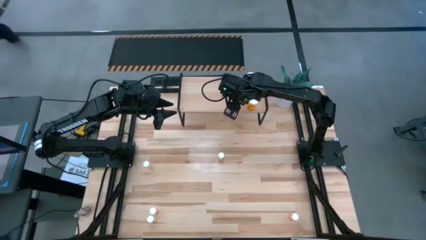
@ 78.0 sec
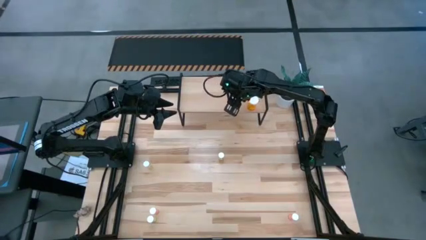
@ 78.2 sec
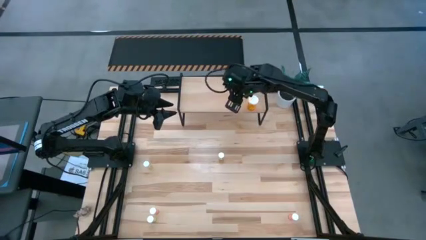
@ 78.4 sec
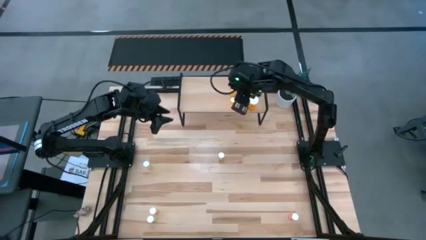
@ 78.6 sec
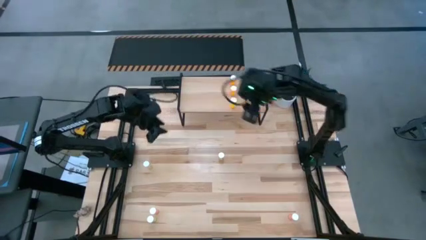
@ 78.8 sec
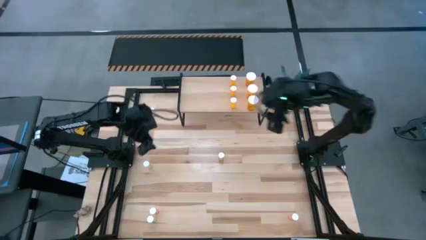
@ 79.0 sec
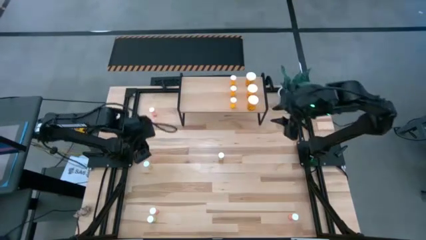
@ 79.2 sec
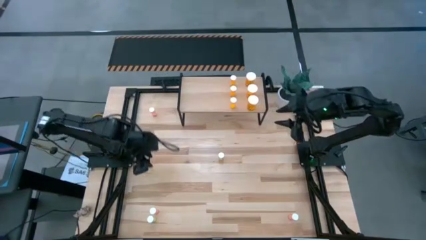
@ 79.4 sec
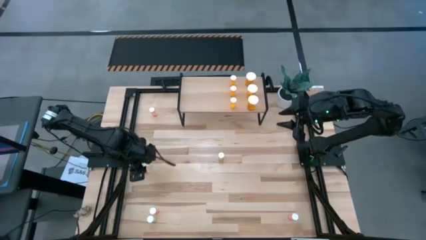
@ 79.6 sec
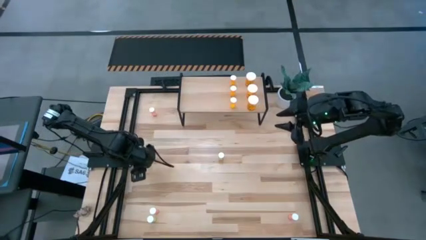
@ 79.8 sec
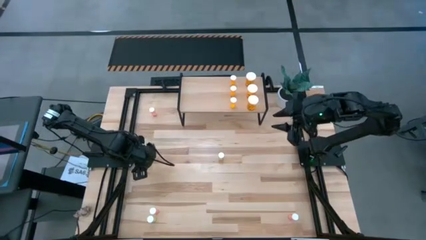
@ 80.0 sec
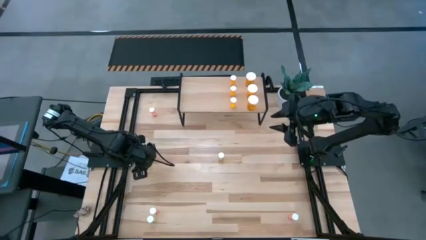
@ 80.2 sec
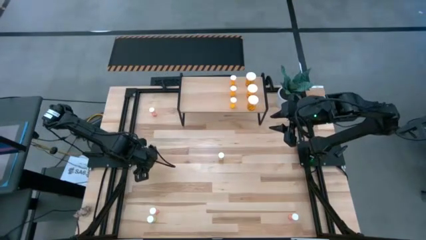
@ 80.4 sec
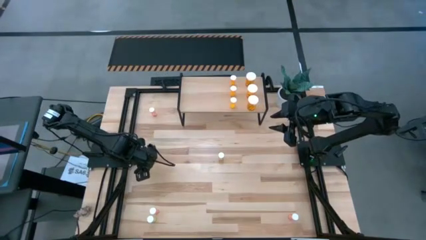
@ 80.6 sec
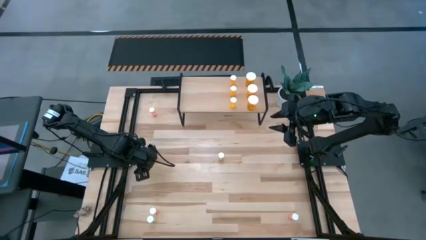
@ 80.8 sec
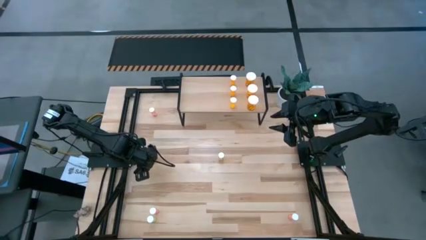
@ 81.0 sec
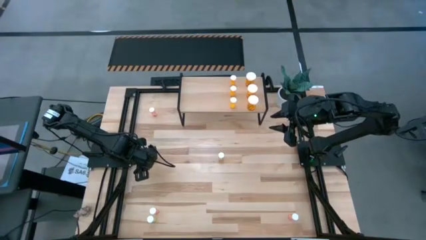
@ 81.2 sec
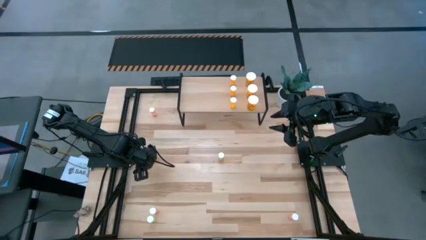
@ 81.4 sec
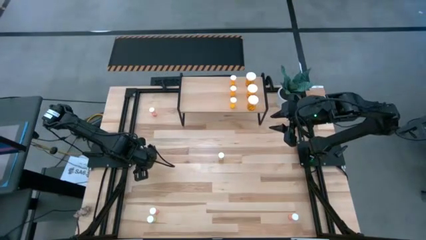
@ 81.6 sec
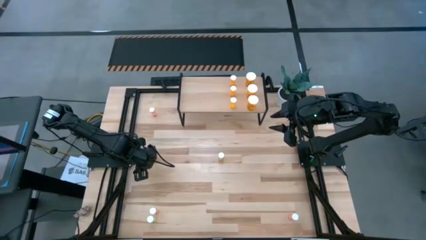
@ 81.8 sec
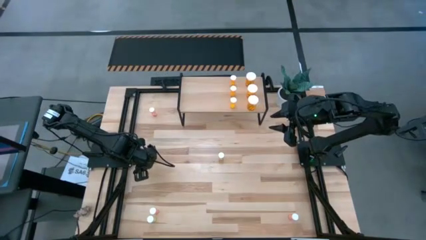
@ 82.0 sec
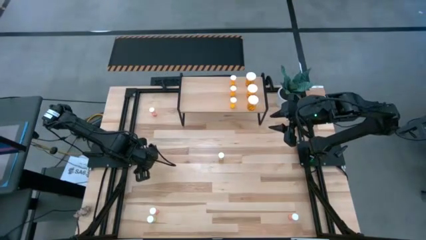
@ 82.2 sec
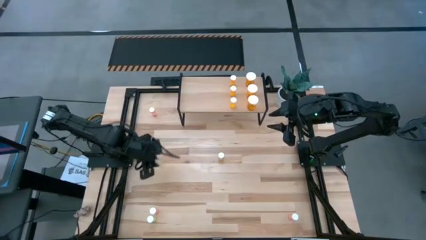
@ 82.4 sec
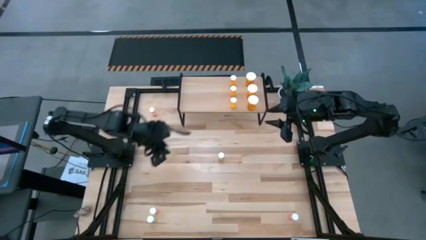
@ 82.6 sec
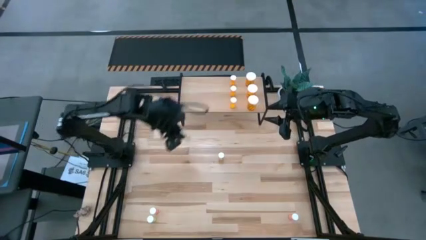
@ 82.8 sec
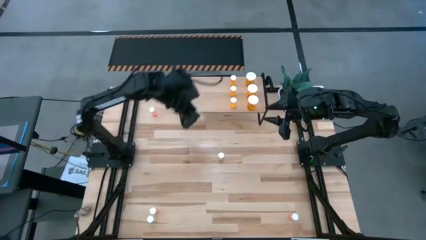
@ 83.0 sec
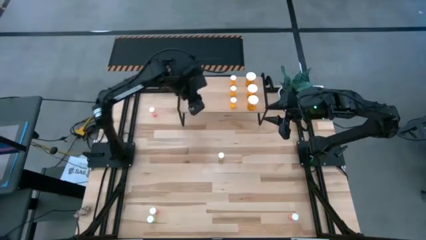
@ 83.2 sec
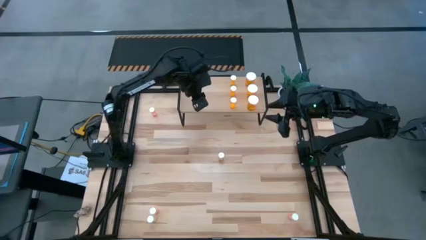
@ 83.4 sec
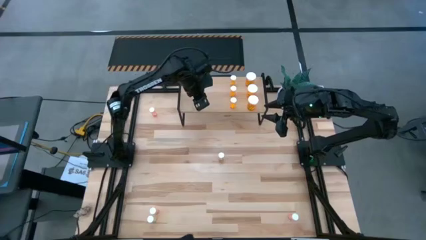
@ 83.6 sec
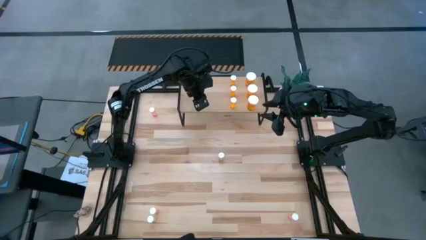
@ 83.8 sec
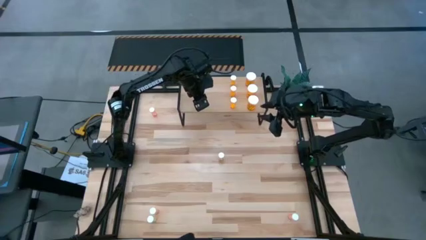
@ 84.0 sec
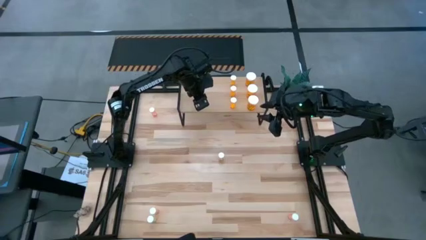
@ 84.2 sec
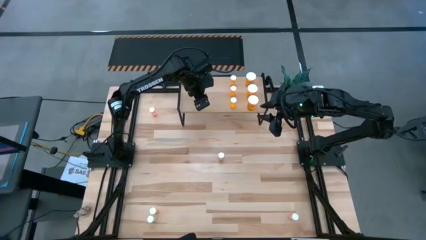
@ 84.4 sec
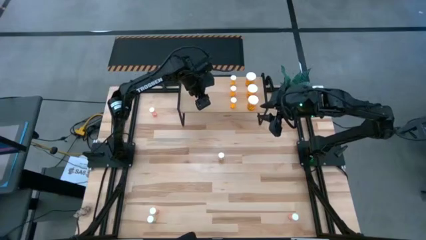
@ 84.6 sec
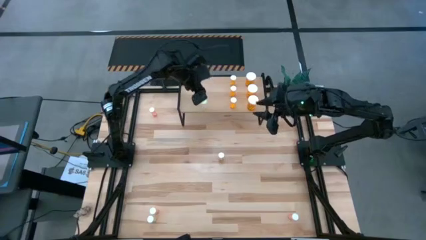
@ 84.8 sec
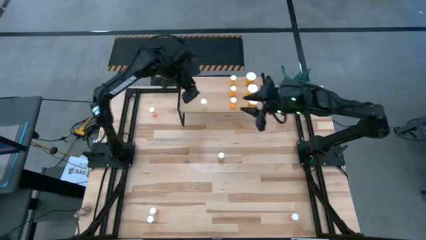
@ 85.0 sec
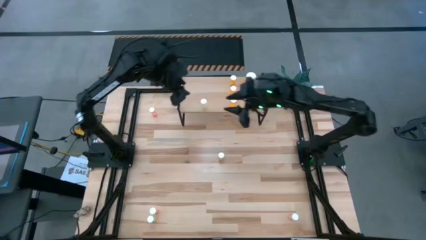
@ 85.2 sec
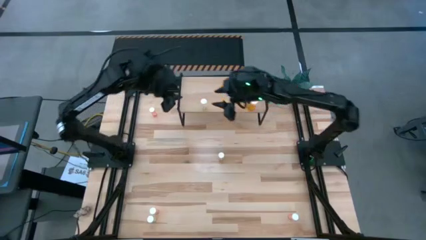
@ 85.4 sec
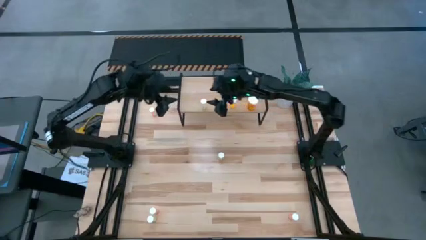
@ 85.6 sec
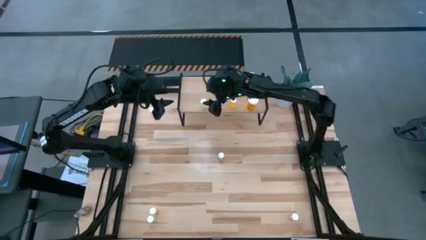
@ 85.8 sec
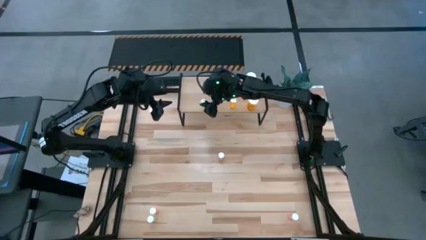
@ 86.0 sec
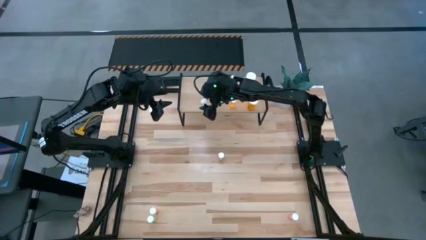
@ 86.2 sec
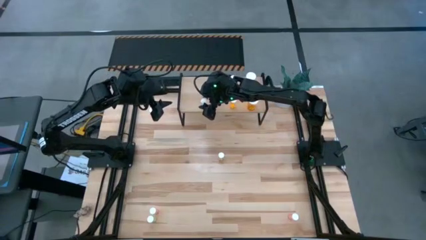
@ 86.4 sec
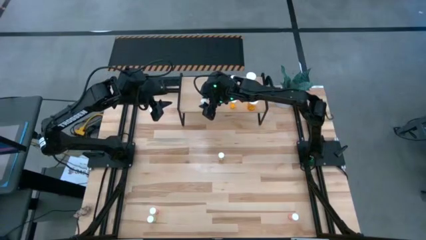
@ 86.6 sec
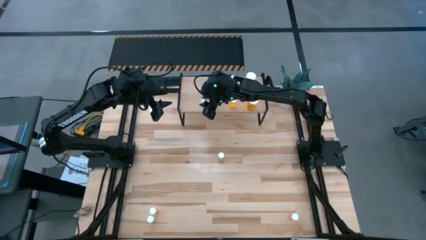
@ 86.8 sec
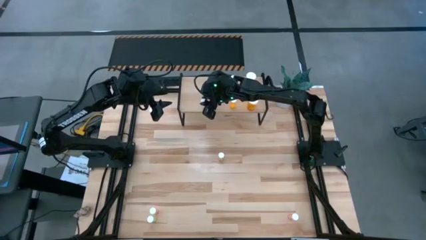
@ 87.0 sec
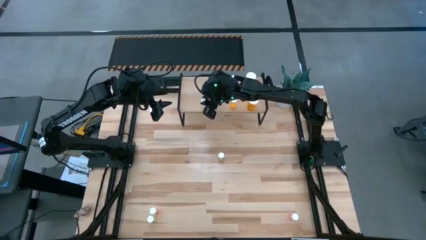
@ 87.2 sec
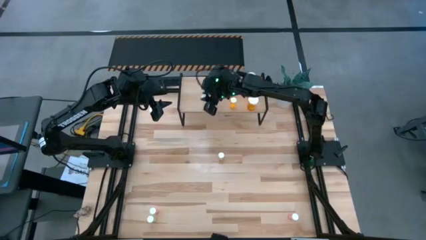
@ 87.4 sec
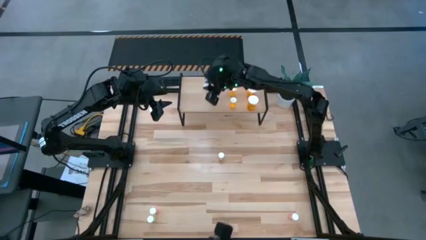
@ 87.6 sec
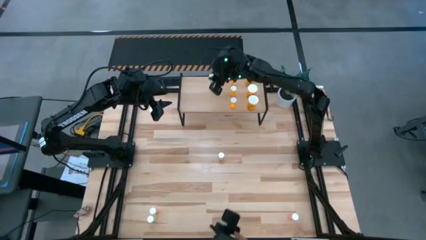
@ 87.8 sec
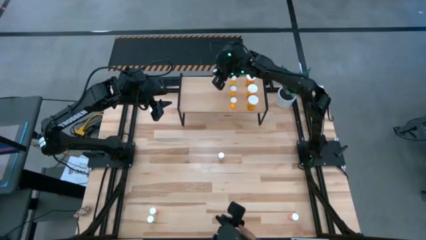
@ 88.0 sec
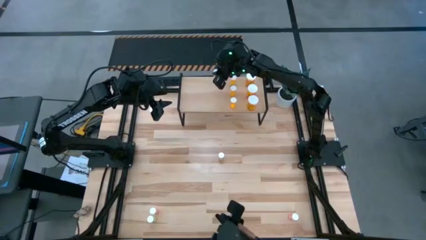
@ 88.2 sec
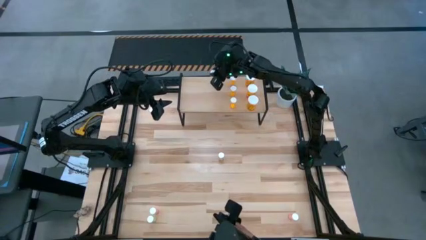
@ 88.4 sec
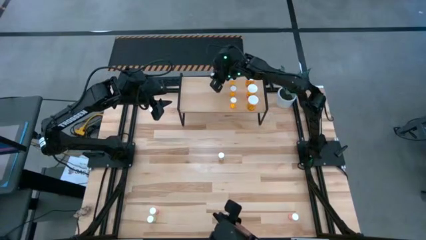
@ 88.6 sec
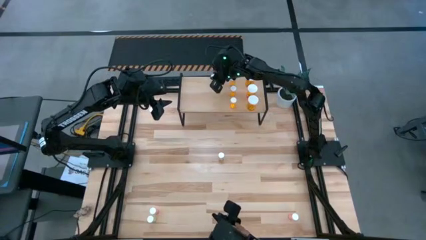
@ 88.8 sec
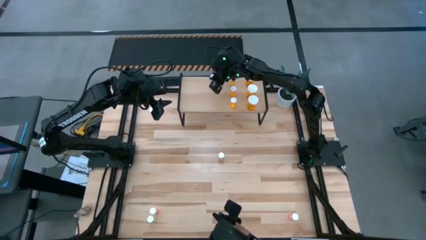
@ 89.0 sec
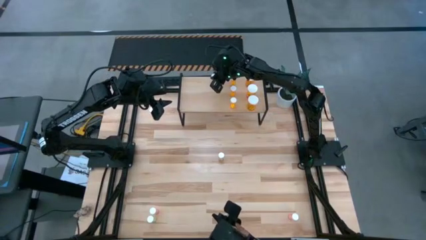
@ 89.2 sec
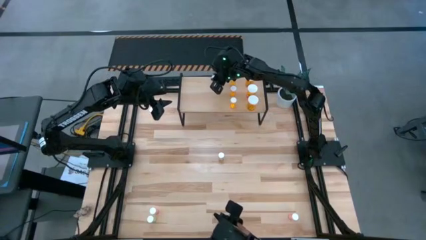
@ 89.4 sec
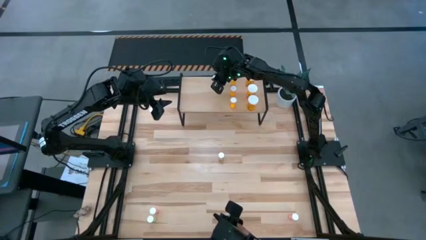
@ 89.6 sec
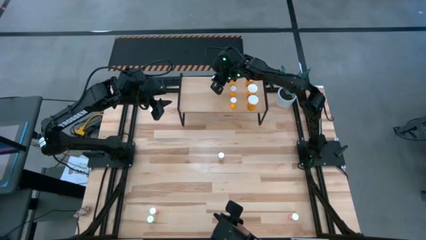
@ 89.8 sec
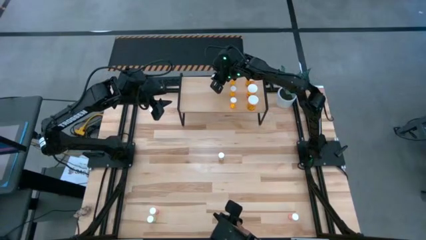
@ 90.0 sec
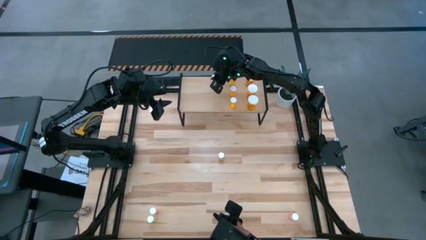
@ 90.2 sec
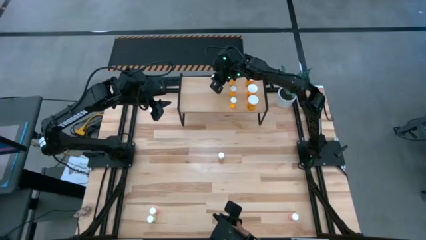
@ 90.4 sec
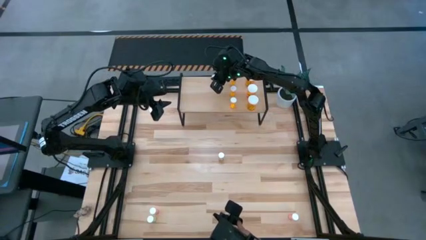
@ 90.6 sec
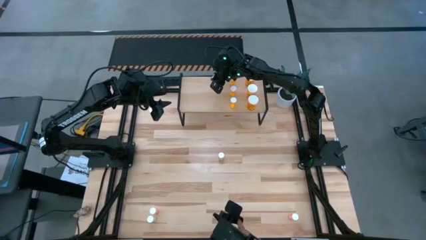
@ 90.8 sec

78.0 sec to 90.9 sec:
Task: Pick and place medicine bottles onto shelf by color
Put the top left yellow pill bottle to the top on the shelf
